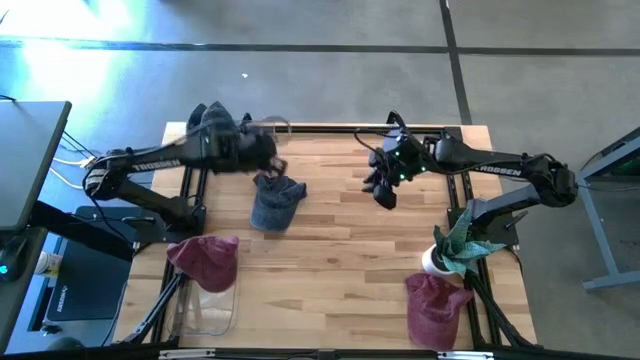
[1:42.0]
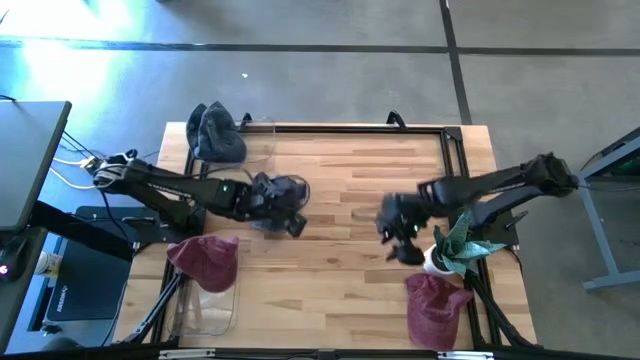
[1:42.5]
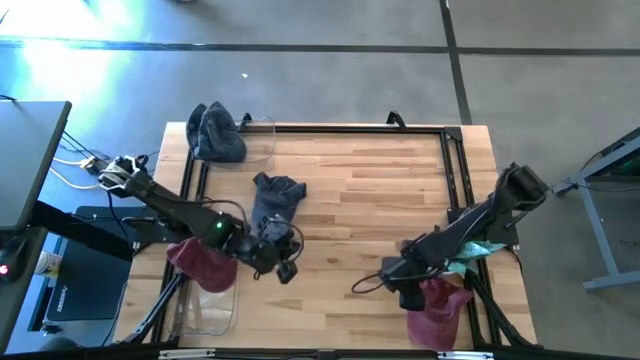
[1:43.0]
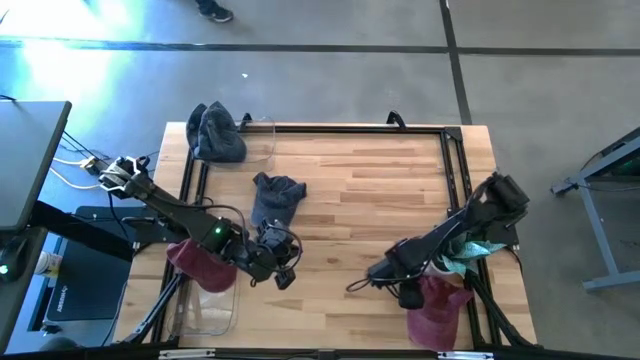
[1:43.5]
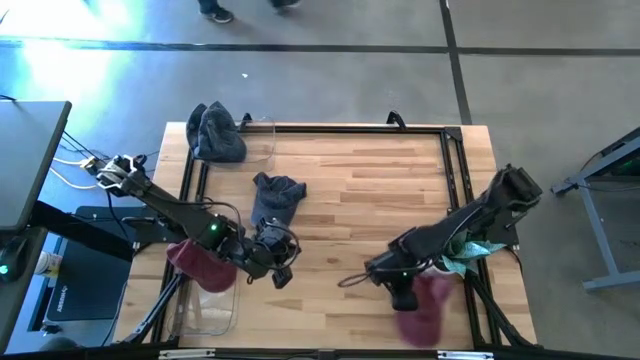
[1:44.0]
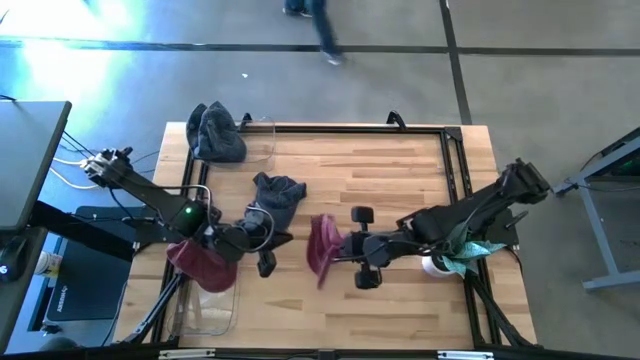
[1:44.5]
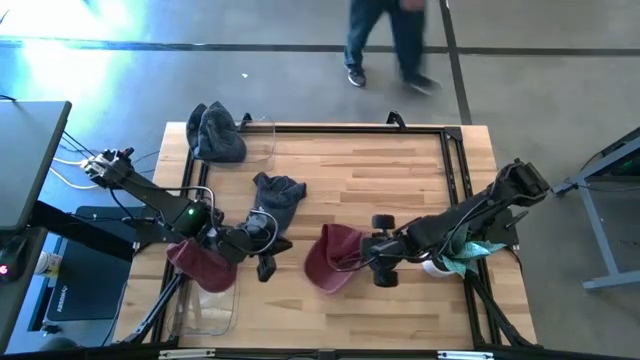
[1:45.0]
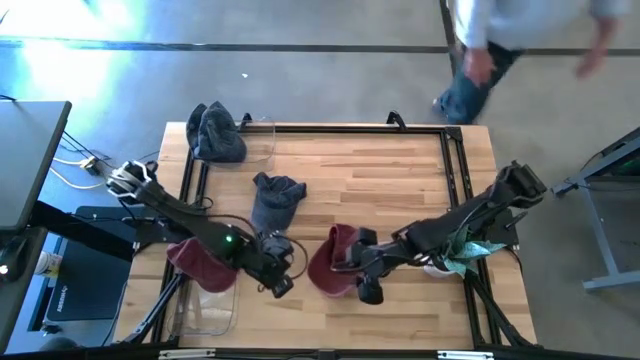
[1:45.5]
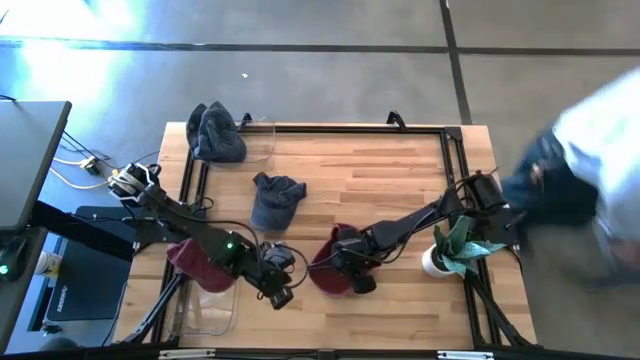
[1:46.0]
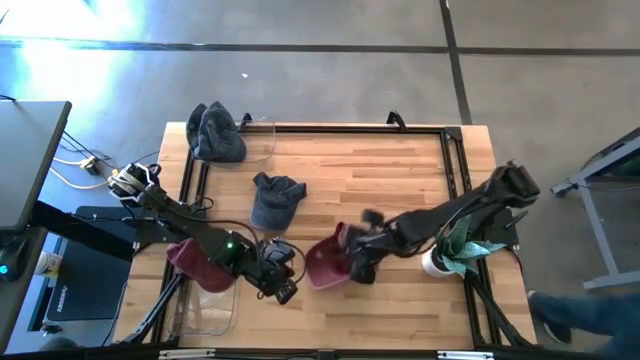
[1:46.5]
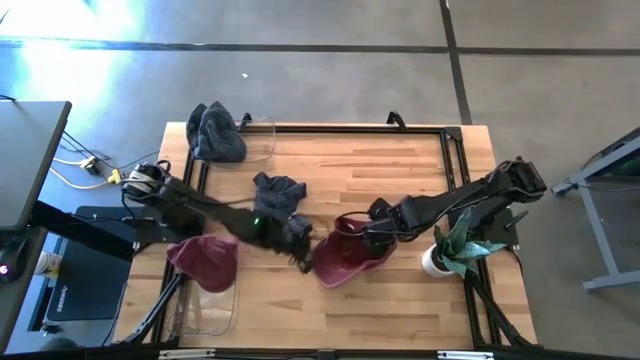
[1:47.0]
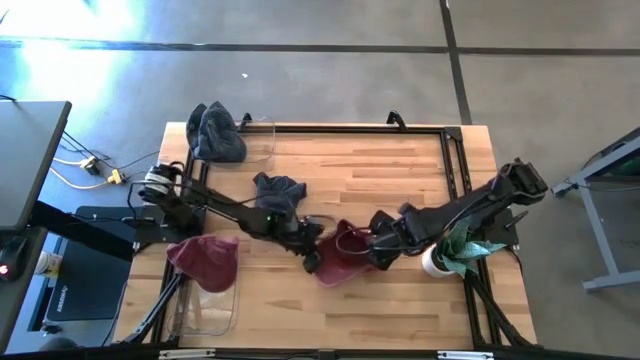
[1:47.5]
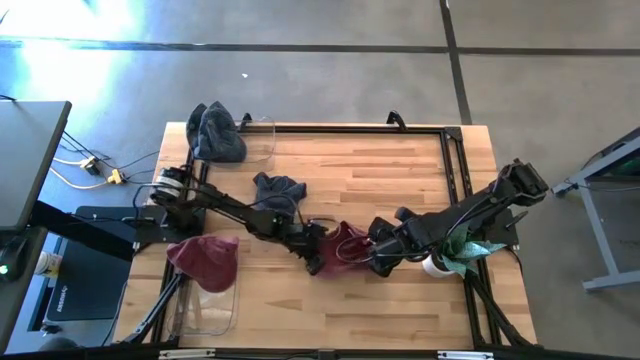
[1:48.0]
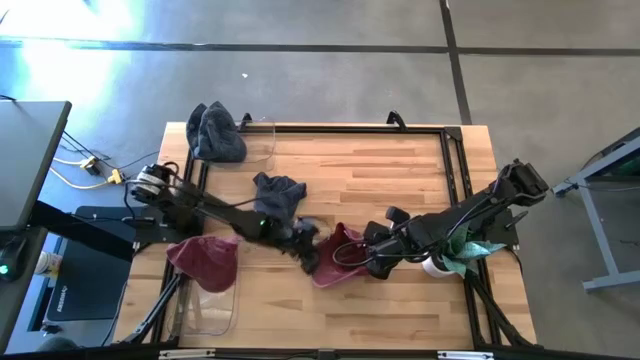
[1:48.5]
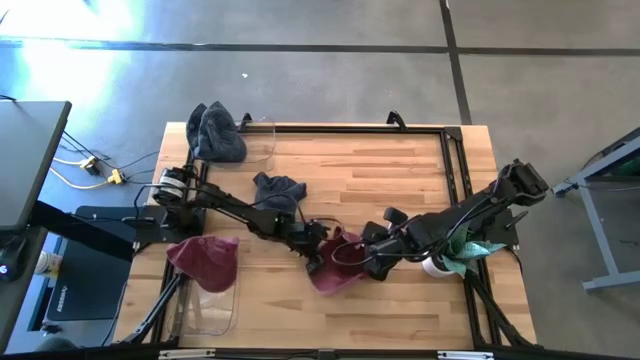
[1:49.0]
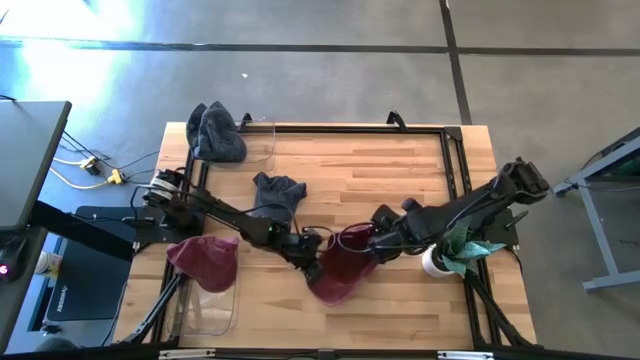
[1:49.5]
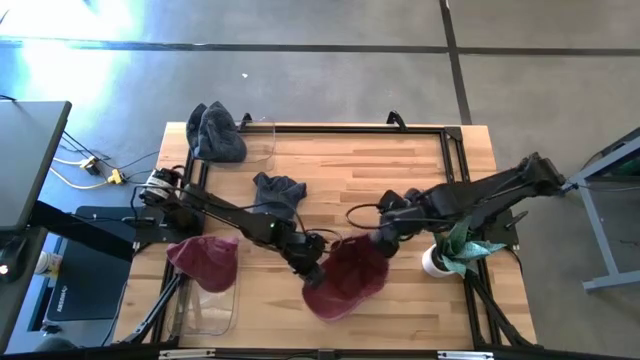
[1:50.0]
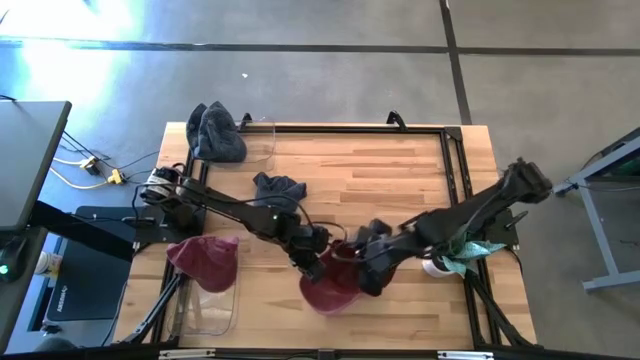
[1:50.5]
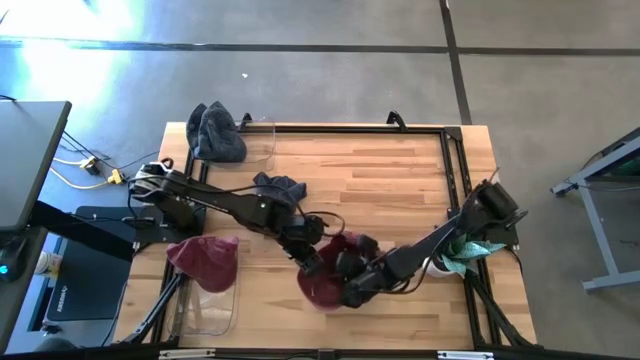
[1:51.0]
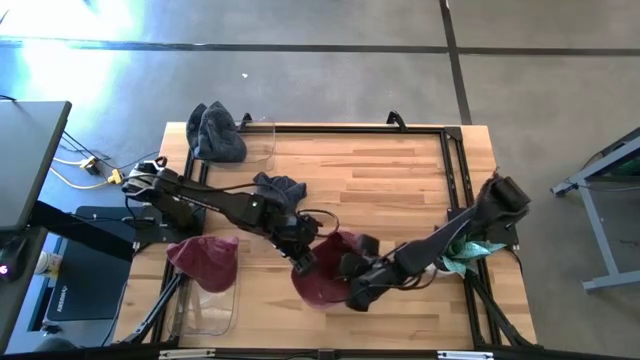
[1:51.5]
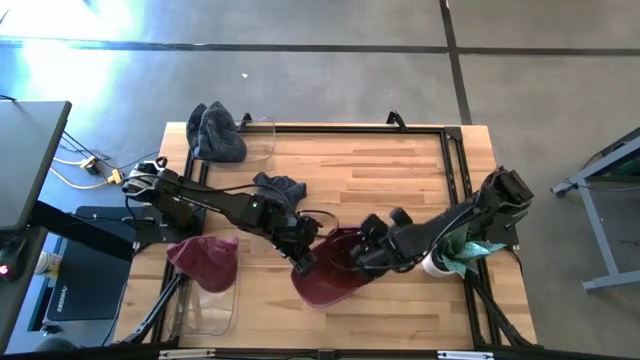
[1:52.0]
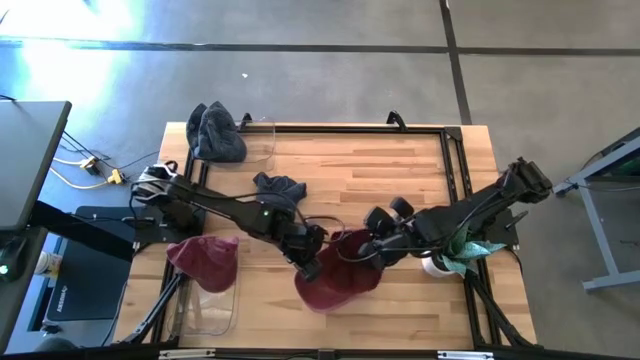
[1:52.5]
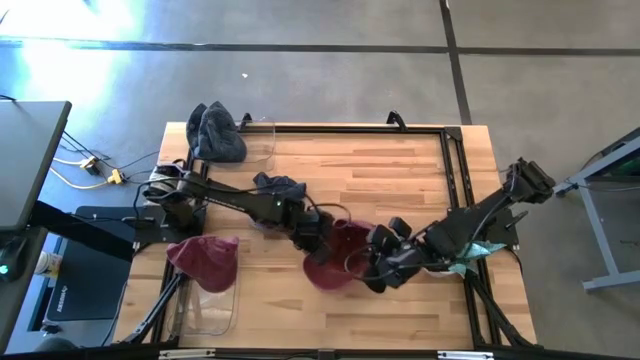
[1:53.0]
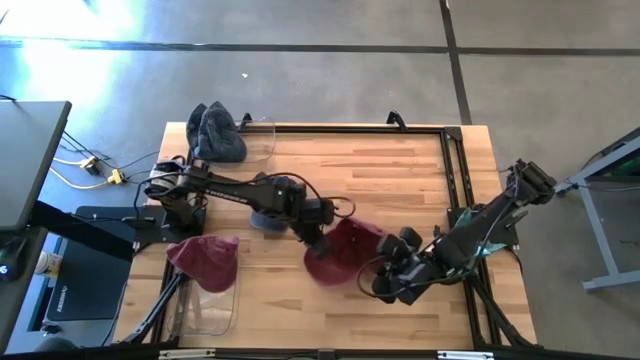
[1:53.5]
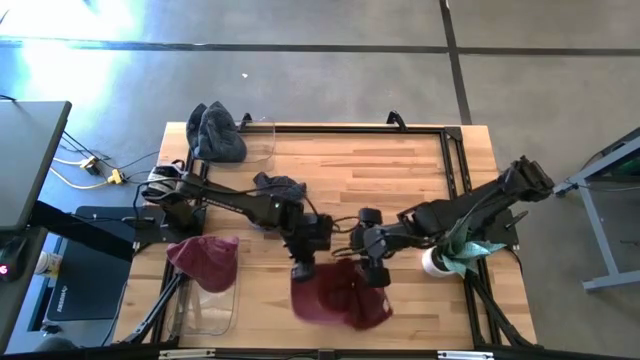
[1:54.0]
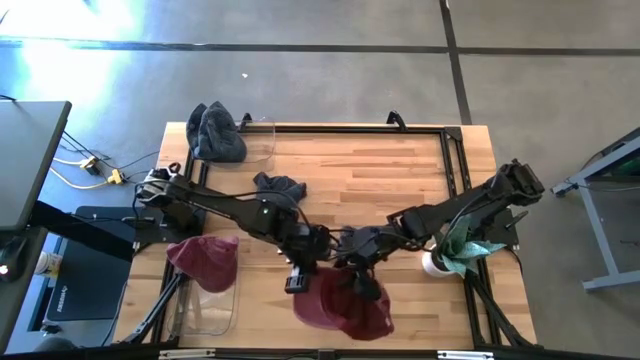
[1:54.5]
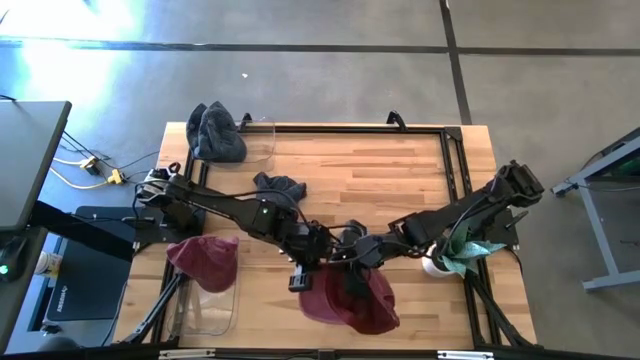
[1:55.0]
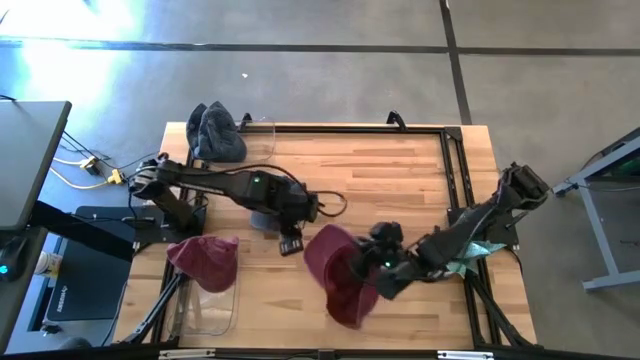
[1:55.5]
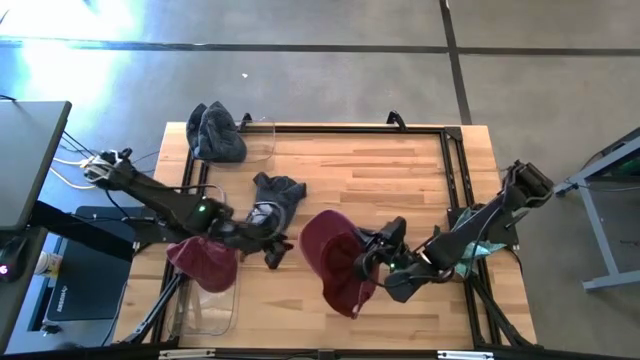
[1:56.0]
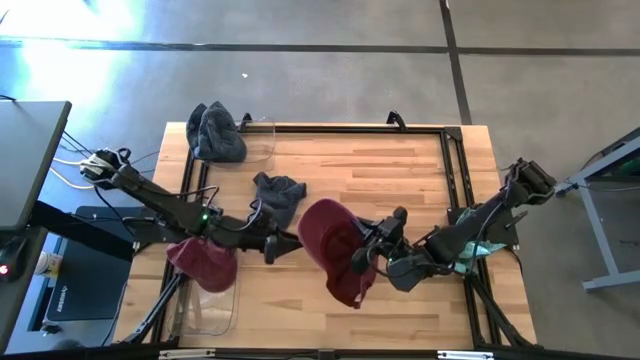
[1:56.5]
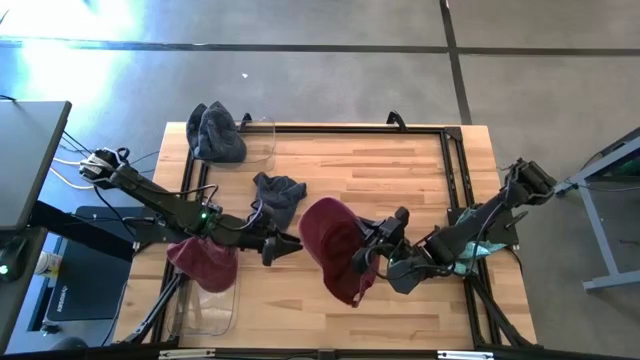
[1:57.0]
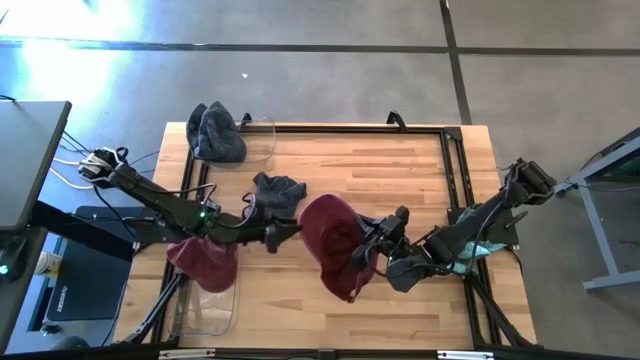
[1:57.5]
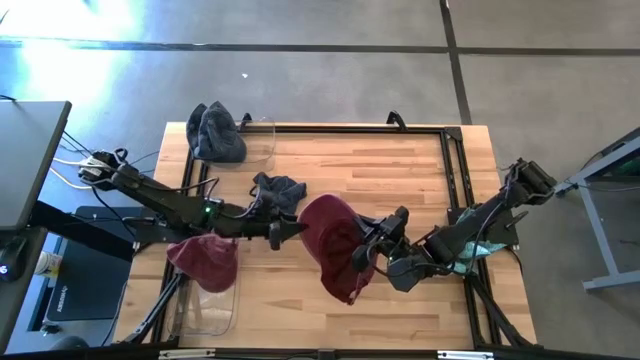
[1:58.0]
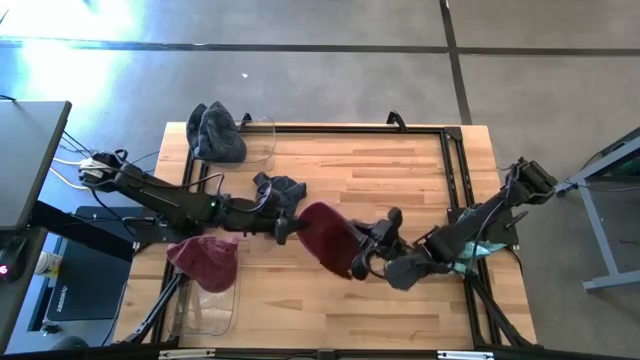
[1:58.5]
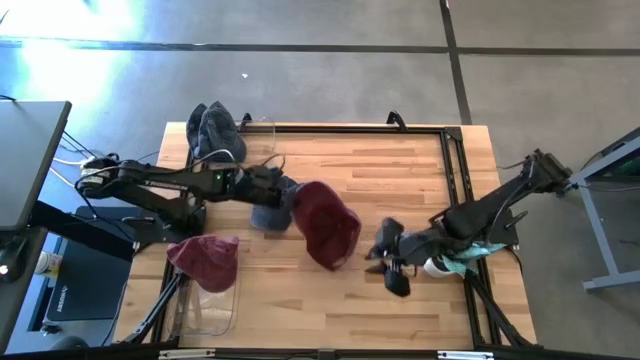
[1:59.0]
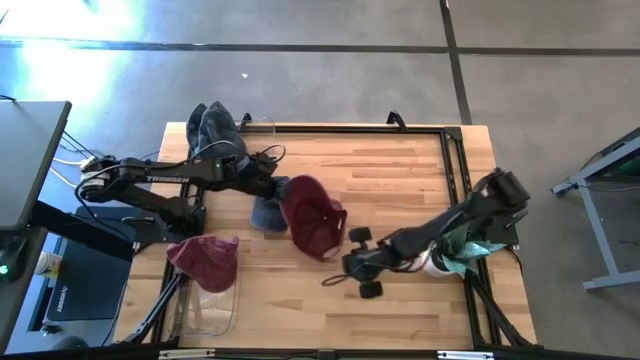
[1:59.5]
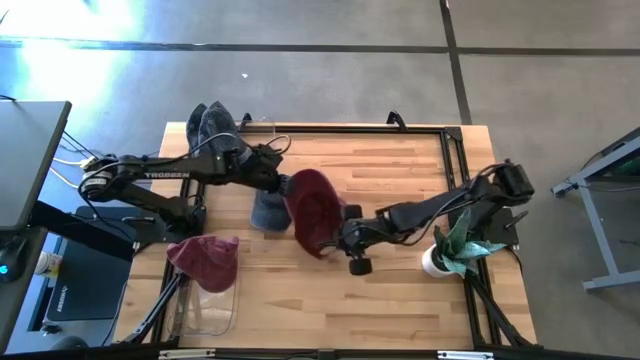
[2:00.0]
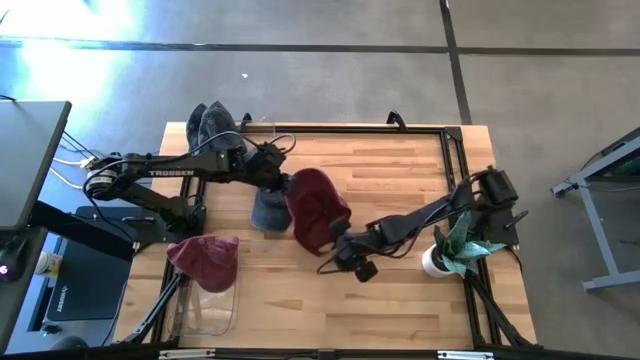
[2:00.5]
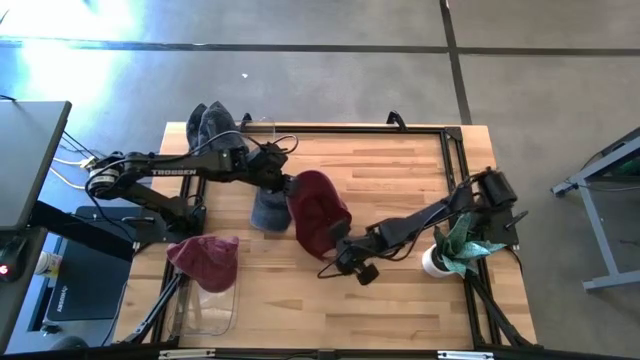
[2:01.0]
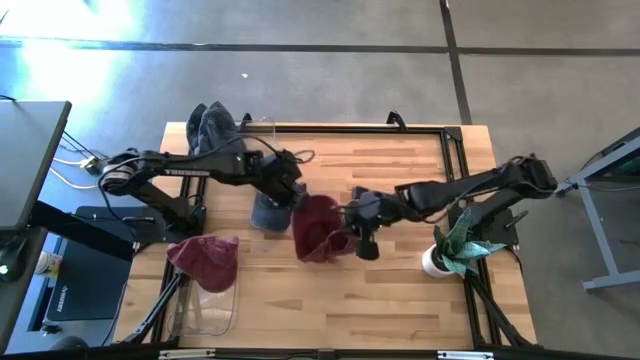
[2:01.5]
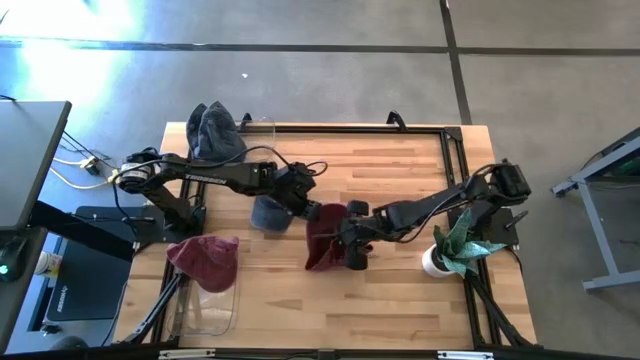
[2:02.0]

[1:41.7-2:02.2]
Task: Pick & Place hat
Put the red cap into the bottom transparent bin
